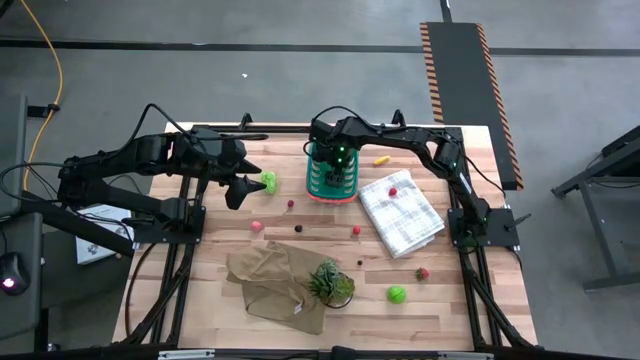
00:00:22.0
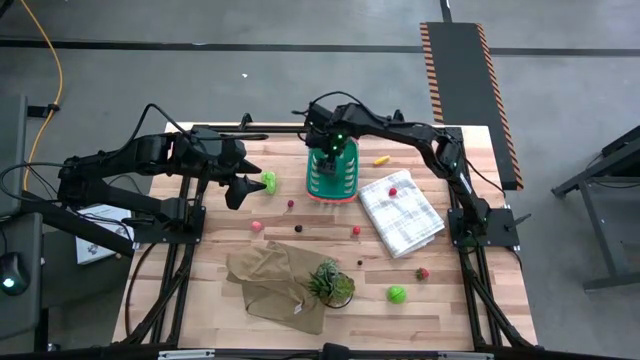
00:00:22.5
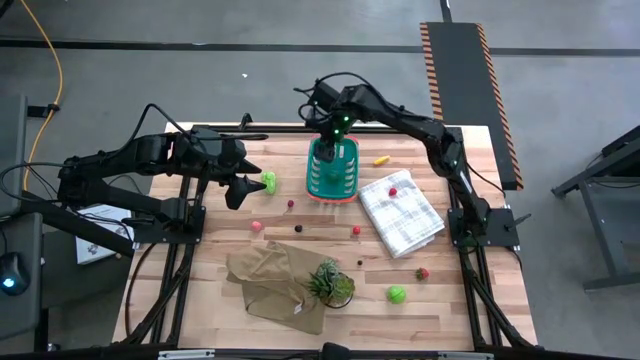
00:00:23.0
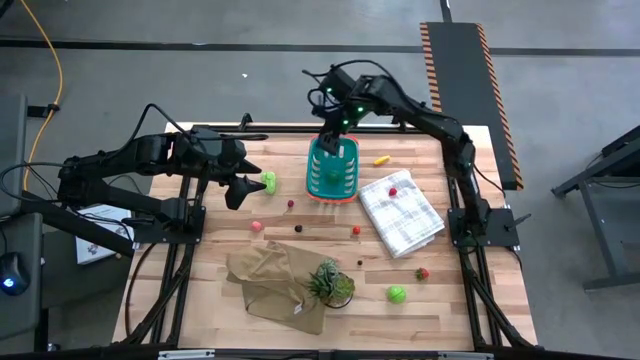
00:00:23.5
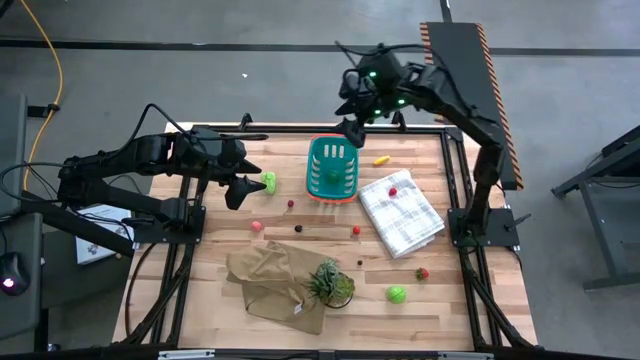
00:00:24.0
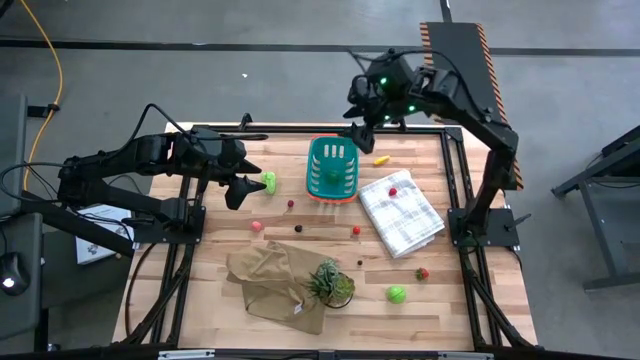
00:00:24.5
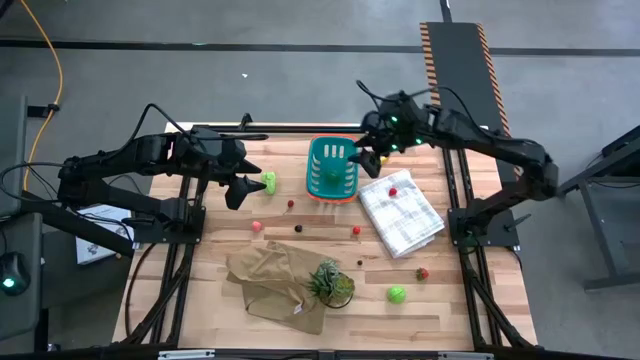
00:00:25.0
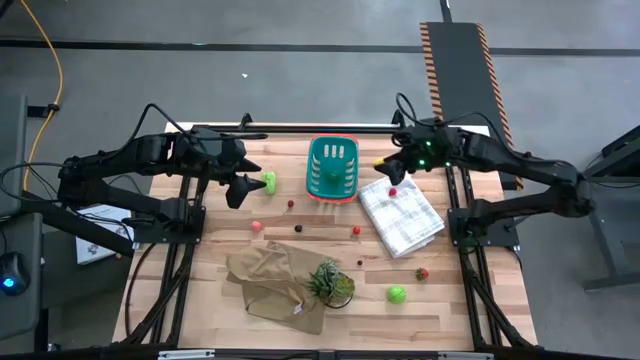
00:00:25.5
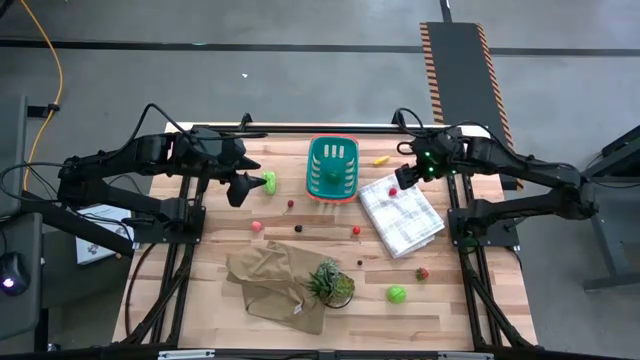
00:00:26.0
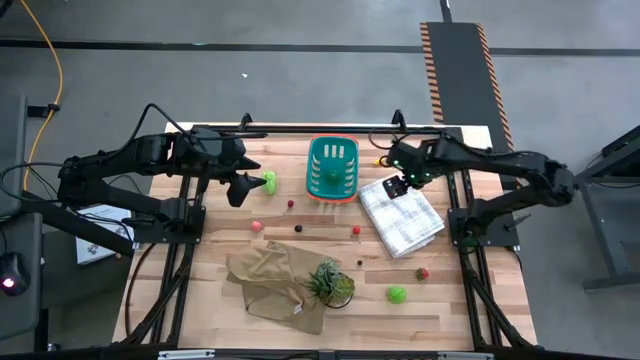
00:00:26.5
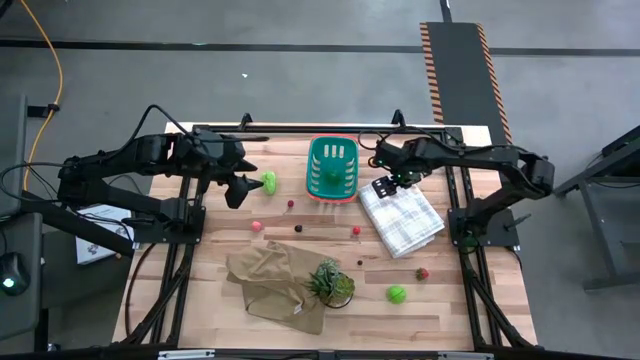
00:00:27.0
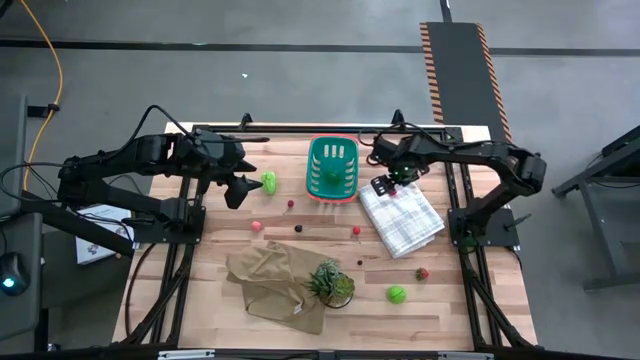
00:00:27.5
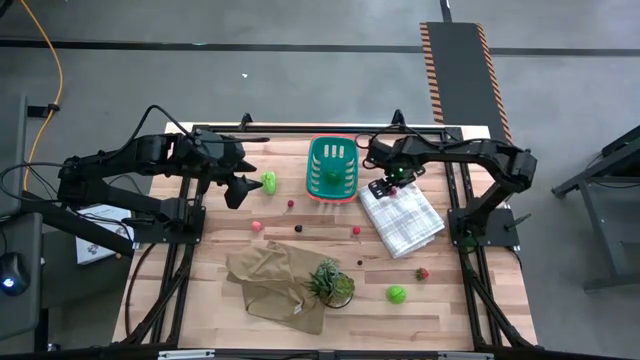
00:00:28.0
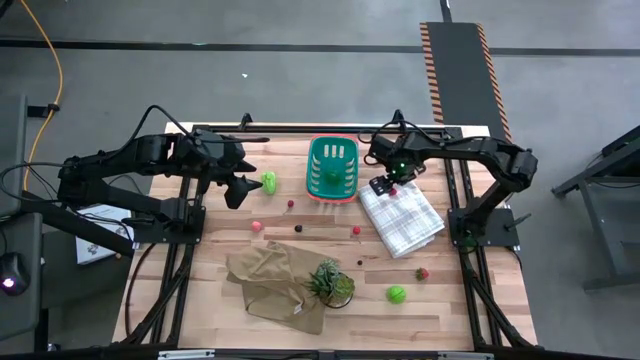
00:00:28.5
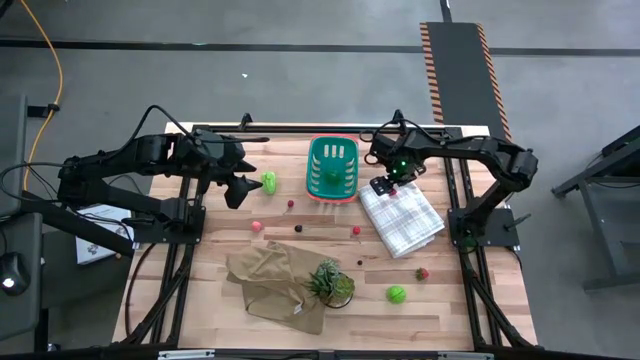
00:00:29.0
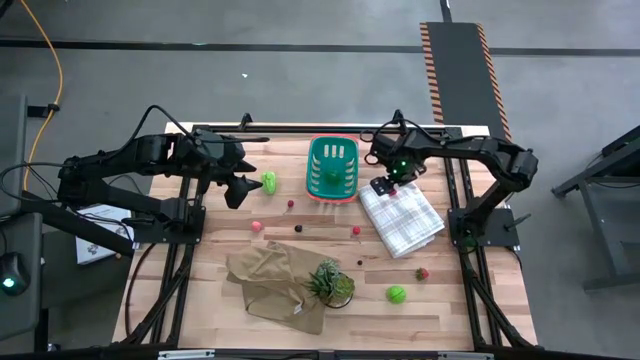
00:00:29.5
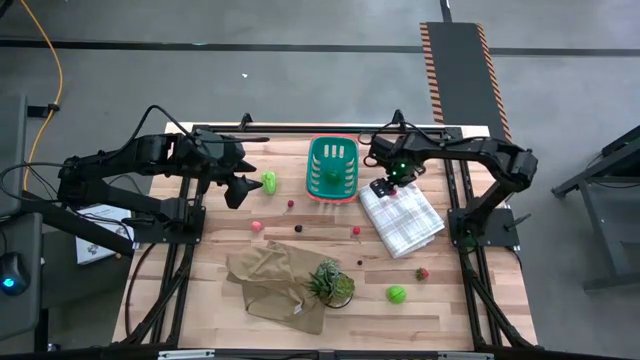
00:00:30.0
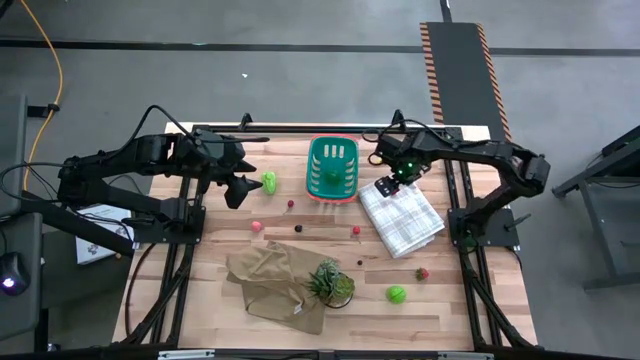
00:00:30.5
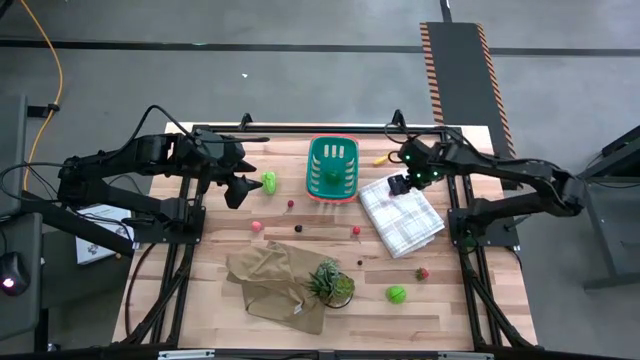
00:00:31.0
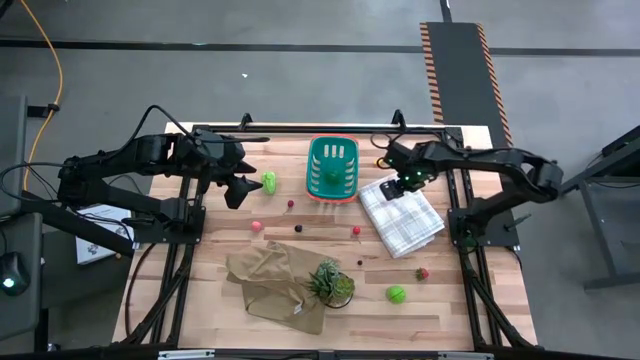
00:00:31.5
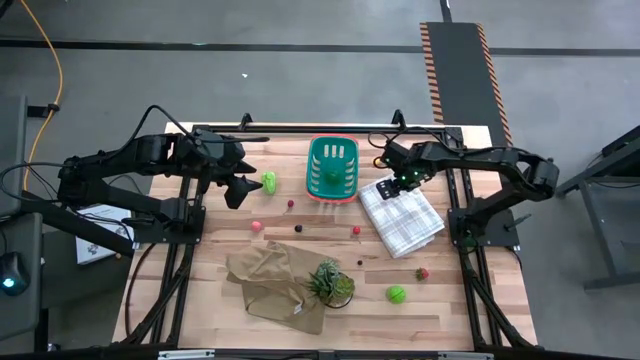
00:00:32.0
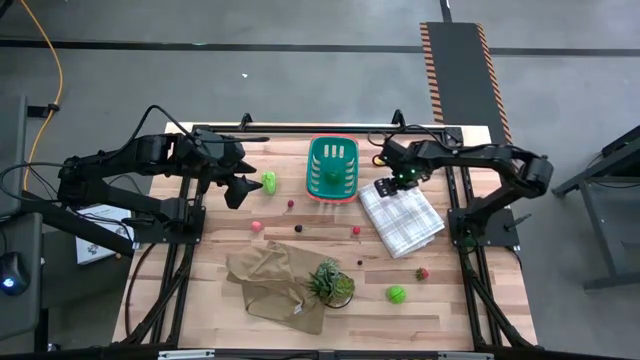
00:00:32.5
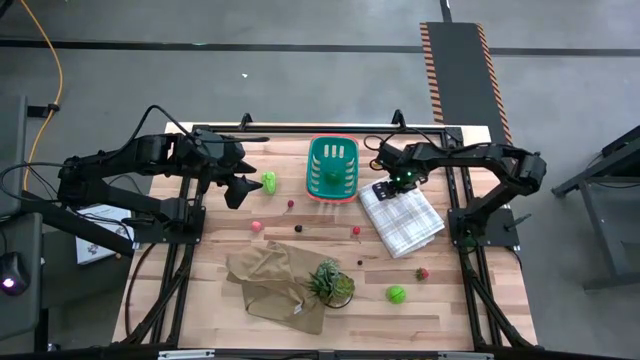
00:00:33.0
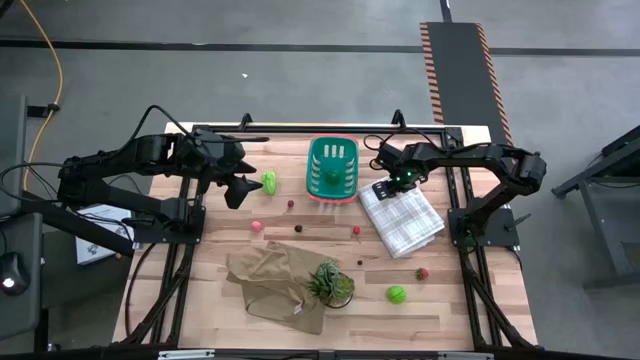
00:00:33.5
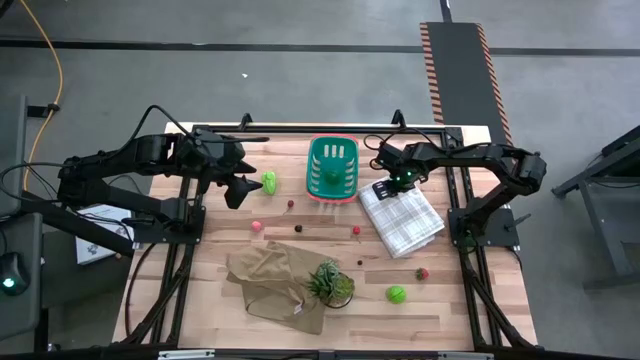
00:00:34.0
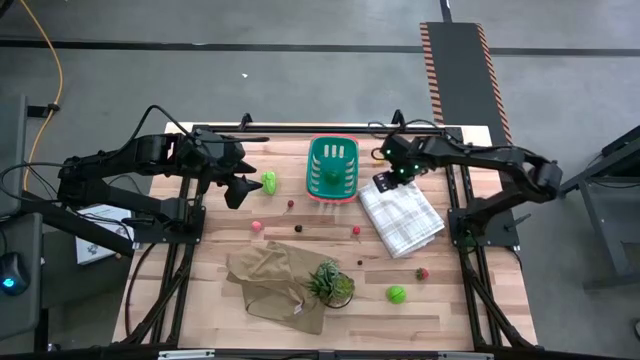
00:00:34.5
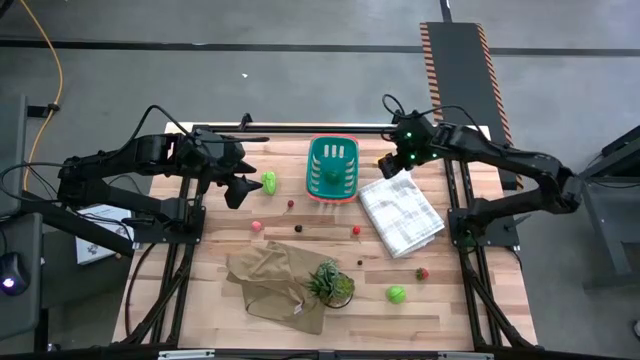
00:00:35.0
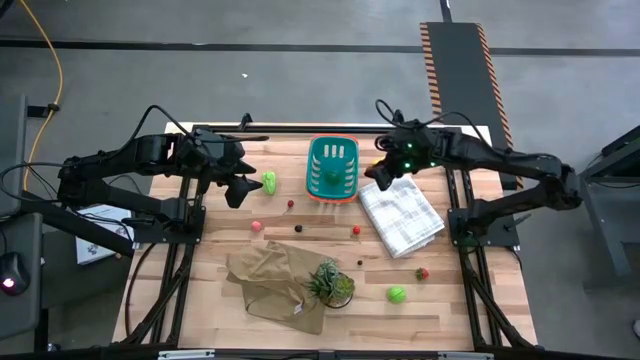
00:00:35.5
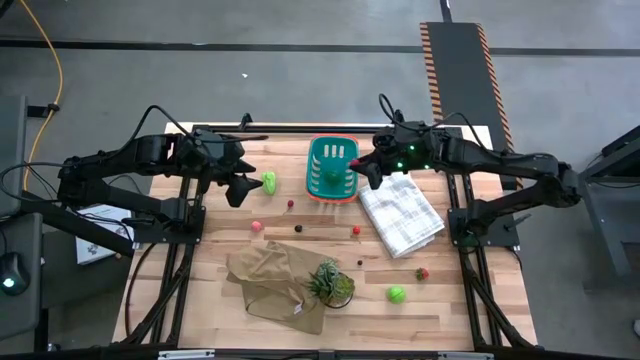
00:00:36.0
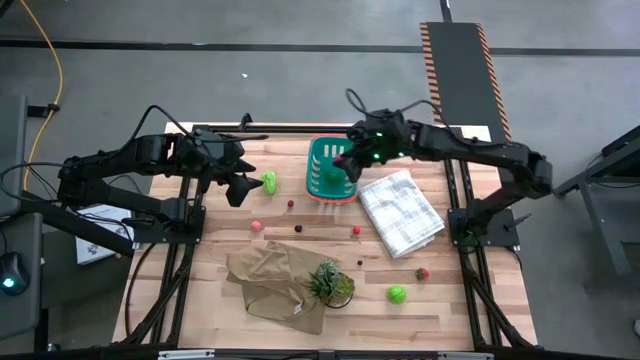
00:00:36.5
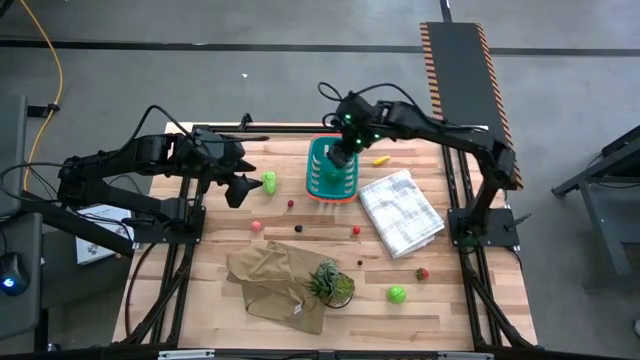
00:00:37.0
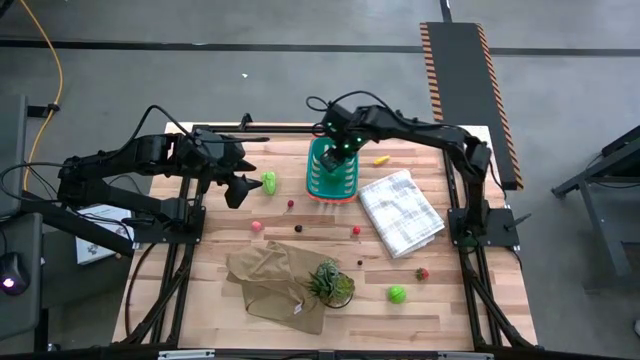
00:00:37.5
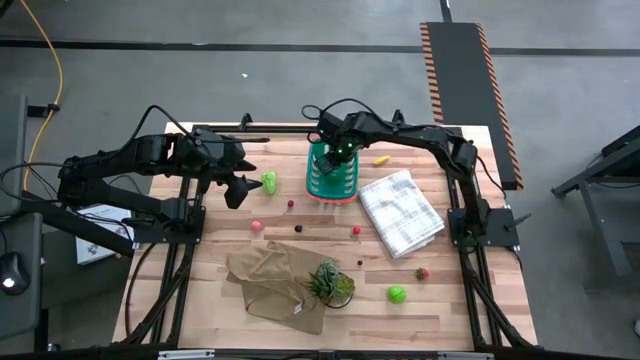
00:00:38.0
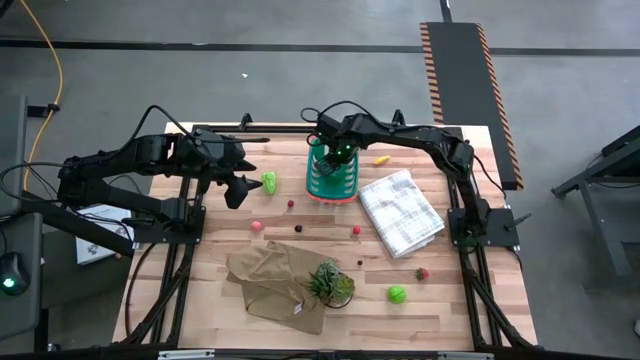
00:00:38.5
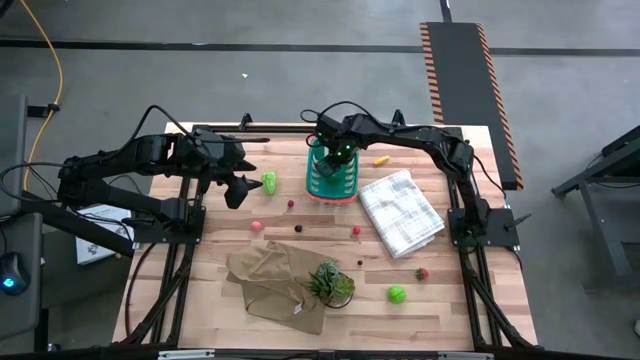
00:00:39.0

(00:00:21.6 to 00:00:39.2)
Task: Pick and placing Produce into tupperware
Put the red raspberry into the green basket
